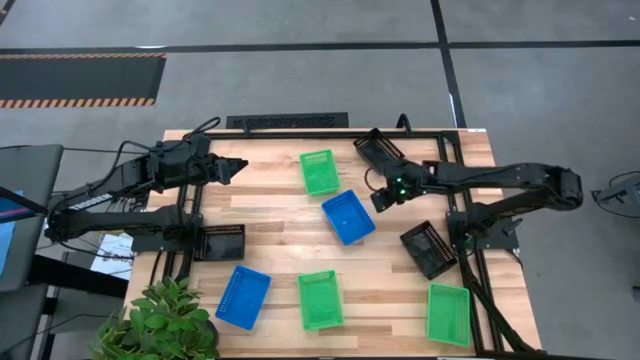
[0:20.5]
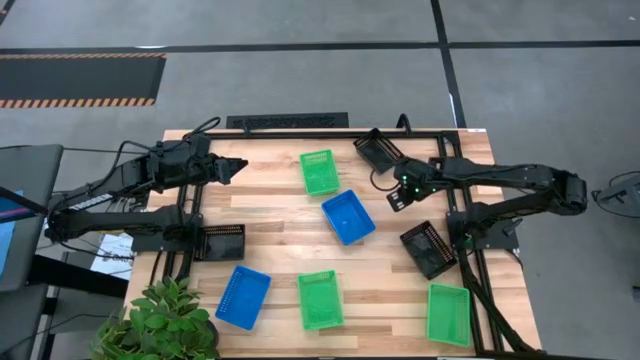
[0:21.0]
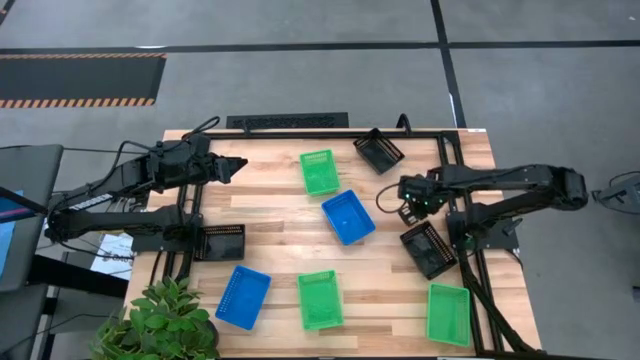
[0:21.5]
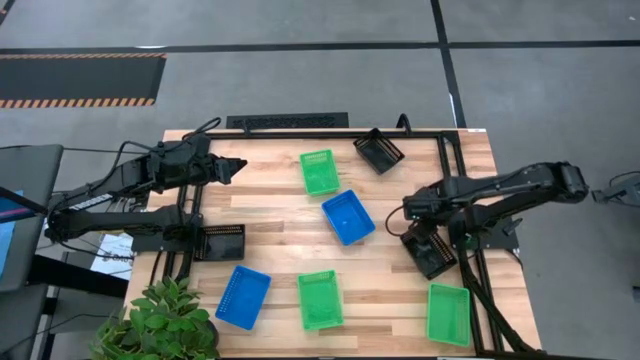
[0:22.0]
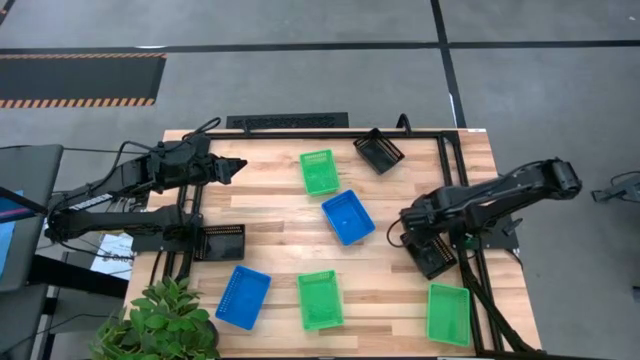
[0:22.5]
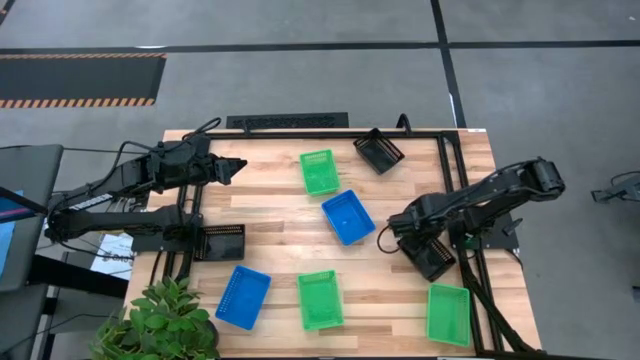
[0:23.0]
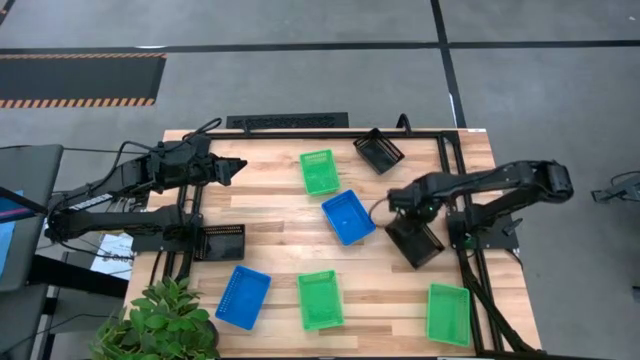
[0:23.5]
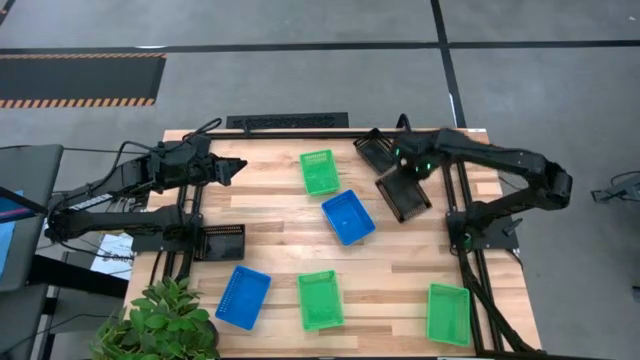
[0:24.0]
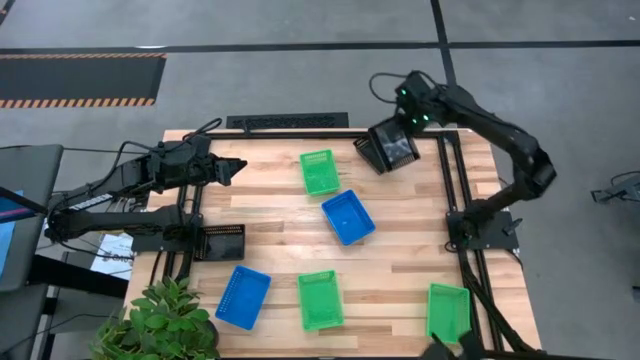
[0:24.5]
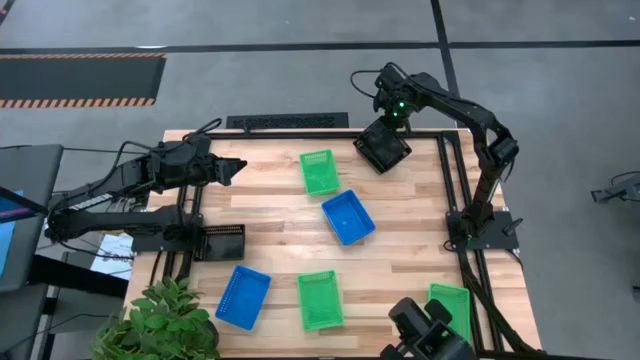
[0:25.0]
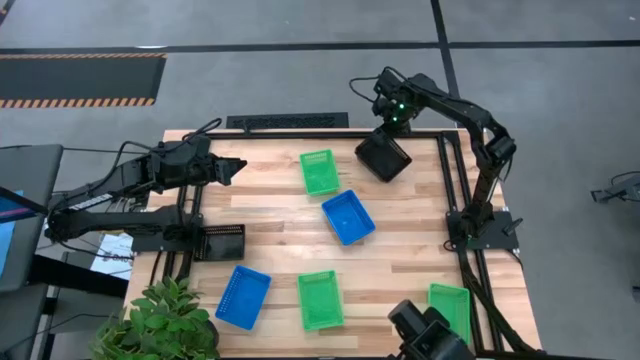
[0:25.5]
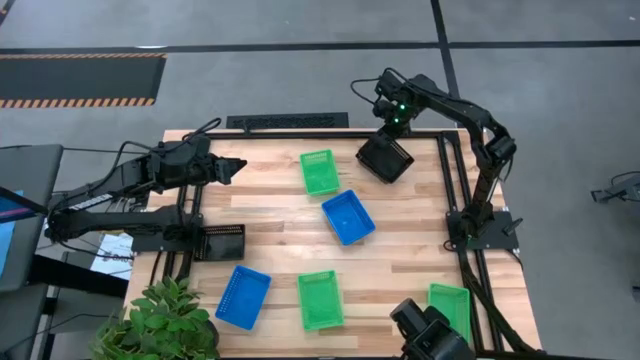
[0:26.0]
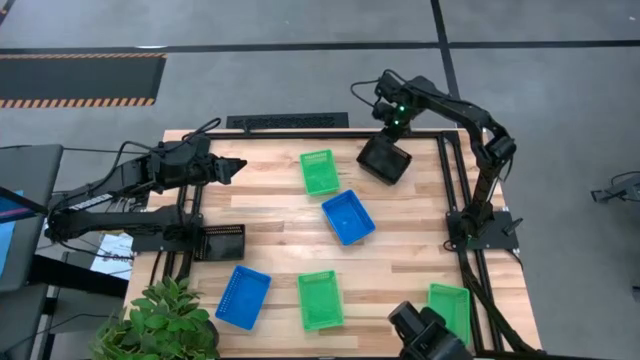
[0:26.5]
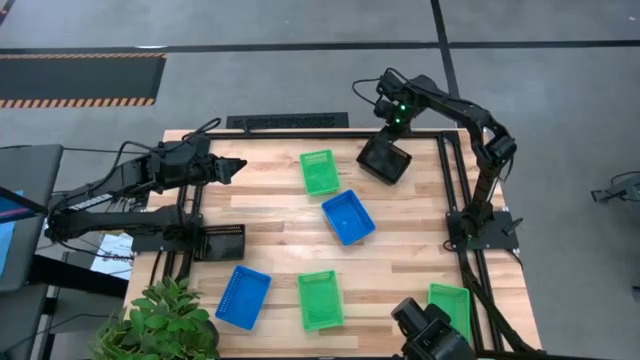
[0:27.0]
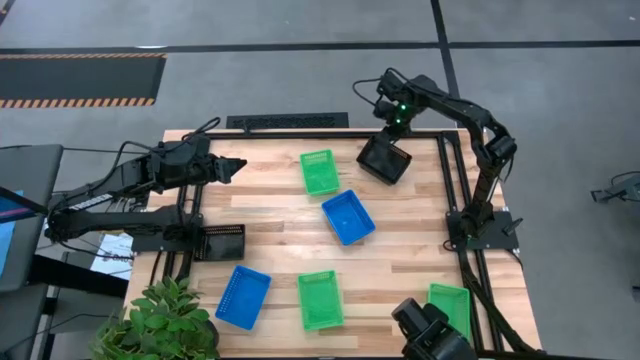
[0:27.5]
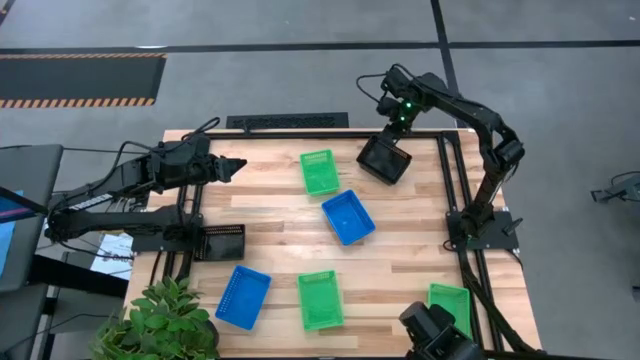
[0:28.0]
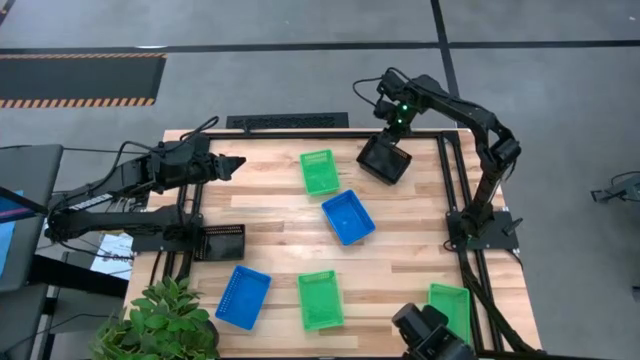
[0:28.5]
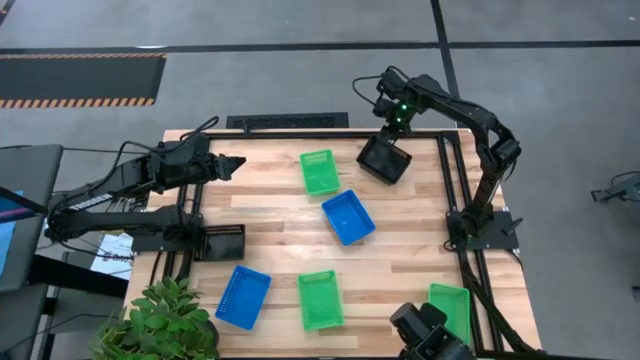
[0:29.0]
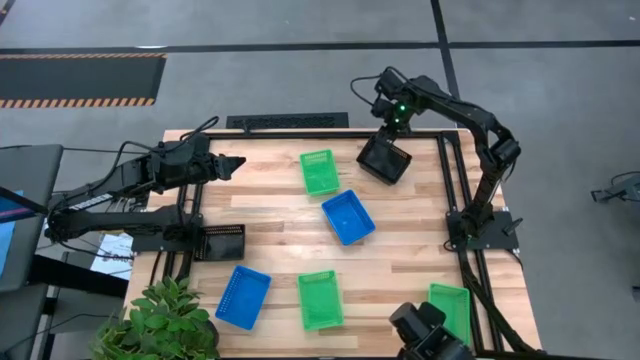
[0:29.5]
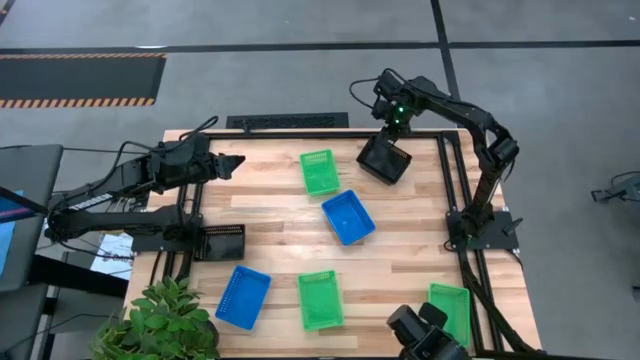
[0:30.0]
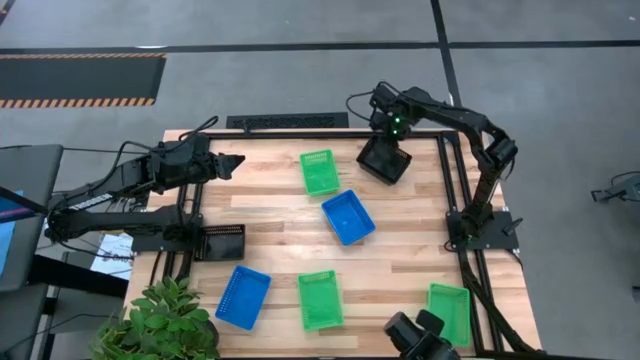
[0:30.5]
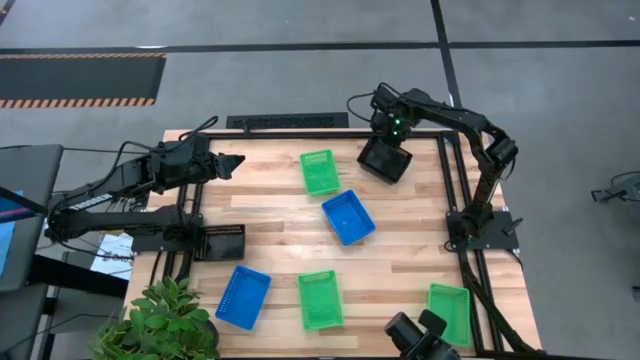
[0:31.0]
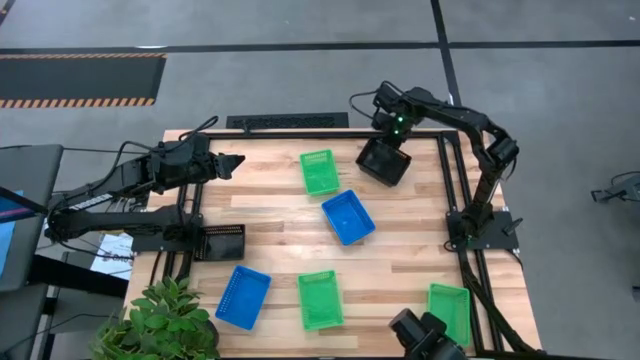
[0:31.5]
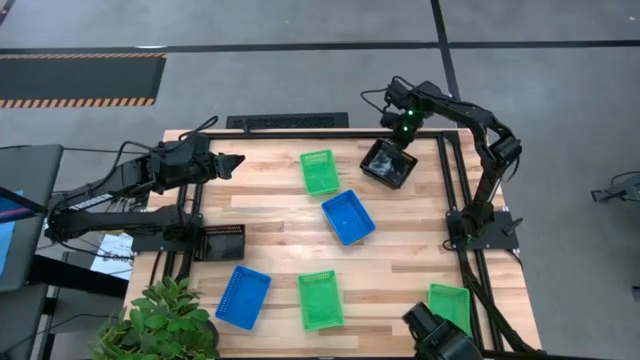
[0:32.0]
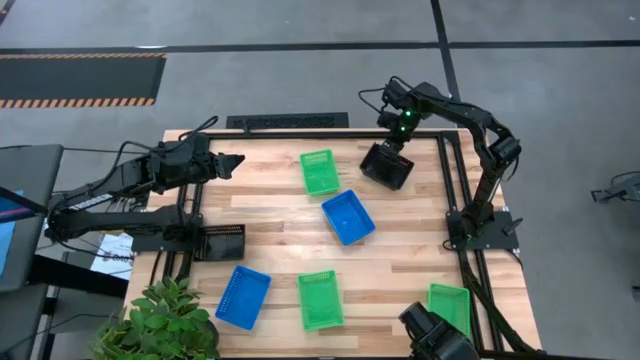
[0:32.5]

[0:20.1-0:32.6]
Stack the bottom right black bin on the top black bin

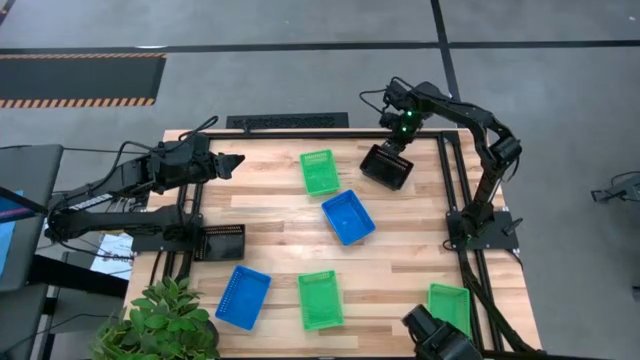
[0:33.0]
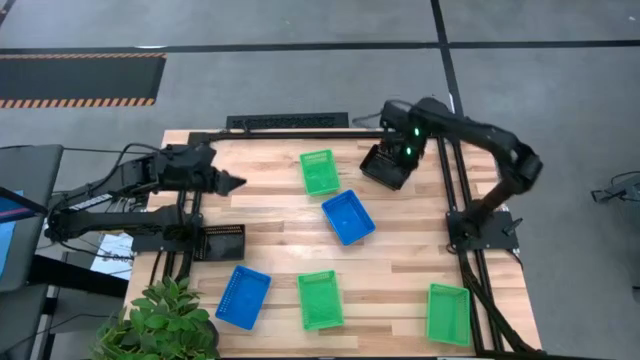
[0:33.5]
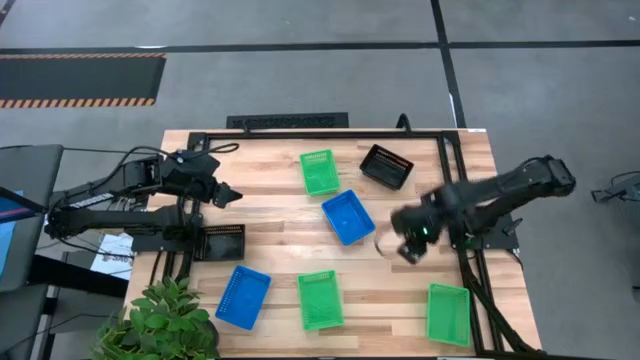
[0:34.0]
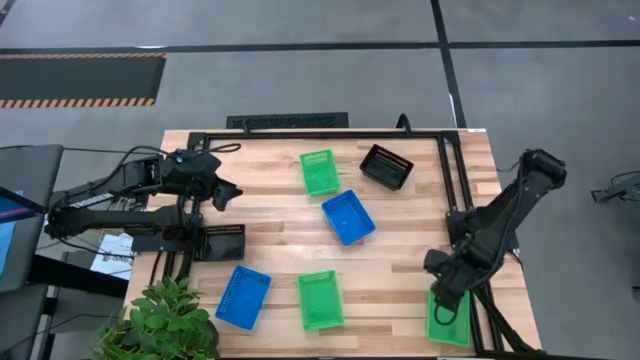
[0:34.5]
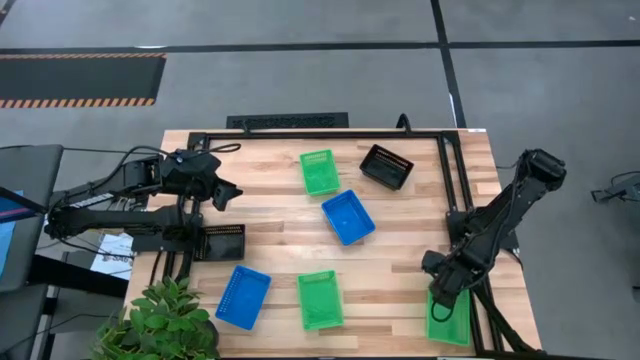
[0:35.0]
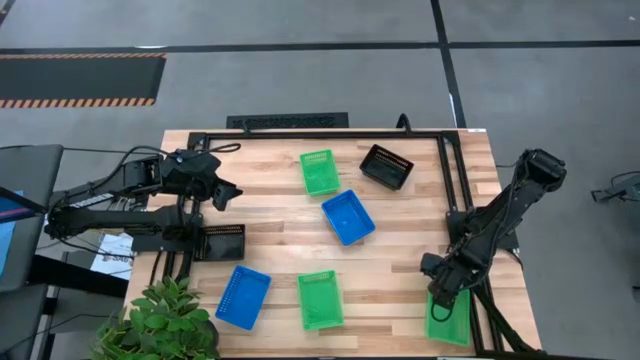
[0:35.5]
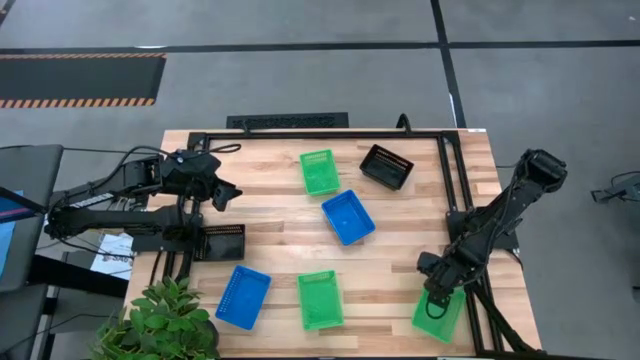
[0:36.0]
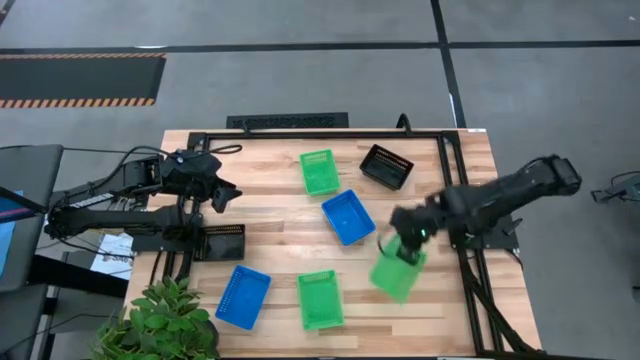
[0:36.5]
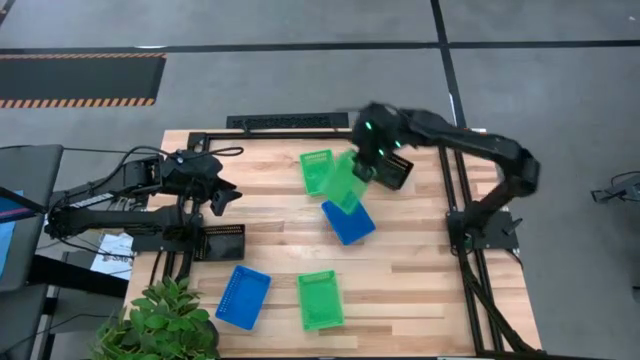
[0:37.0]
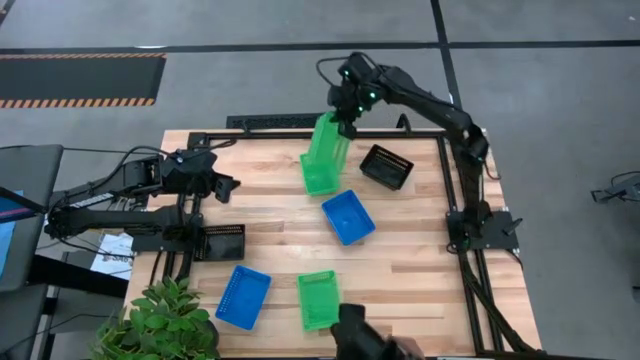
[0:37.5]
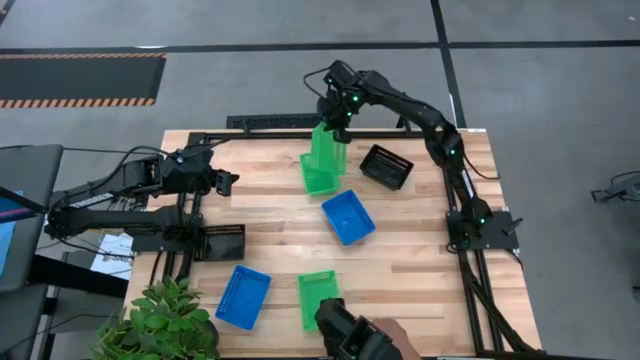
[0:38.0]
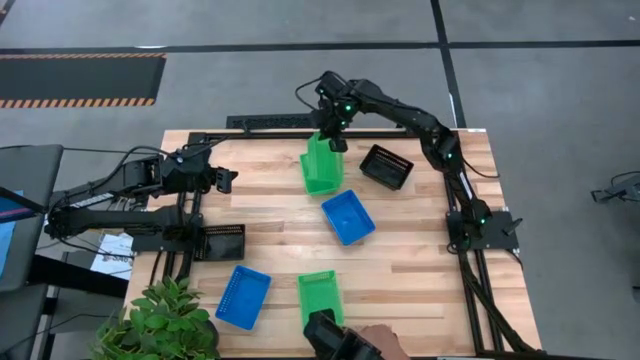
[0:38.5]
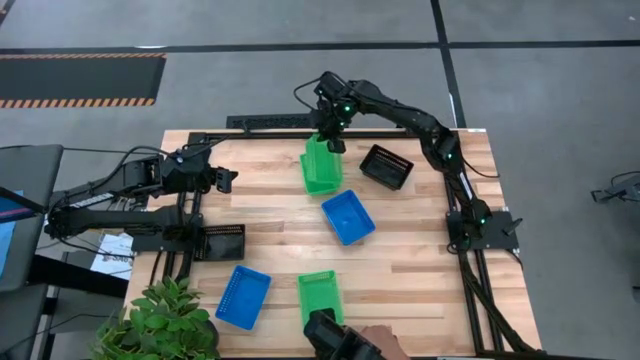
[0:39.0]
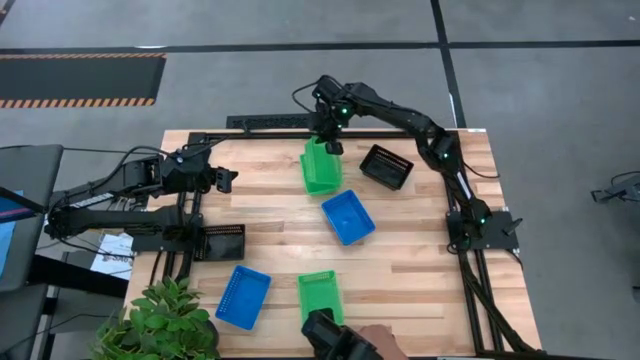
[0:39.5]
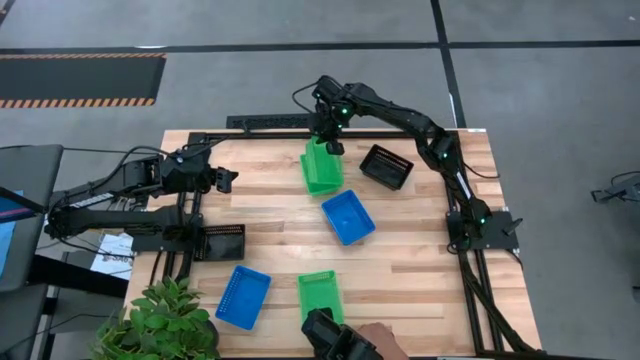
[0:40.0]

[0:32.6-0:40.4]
Stack the bottom right green bin on the top green bin
